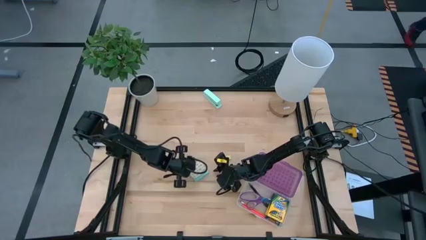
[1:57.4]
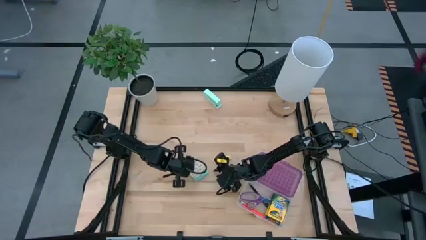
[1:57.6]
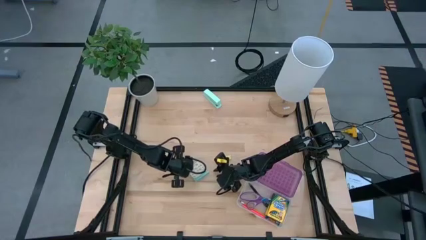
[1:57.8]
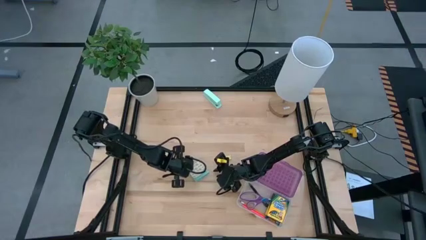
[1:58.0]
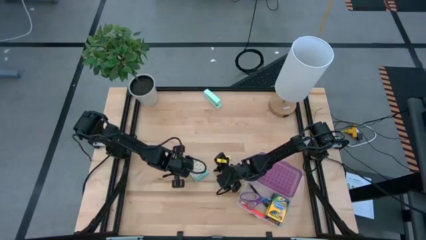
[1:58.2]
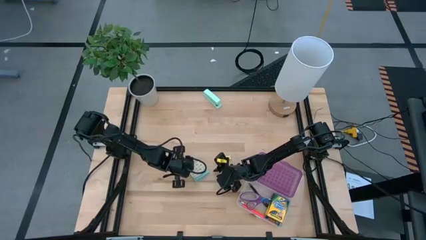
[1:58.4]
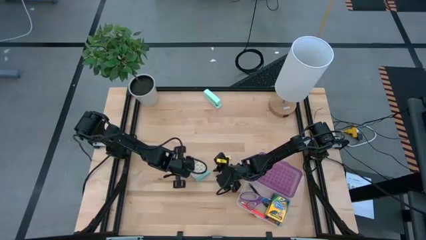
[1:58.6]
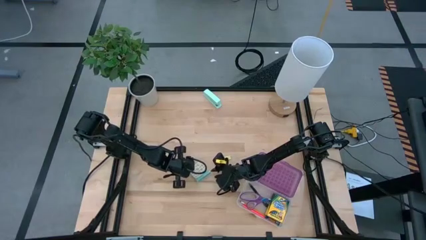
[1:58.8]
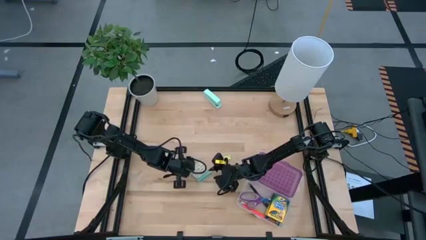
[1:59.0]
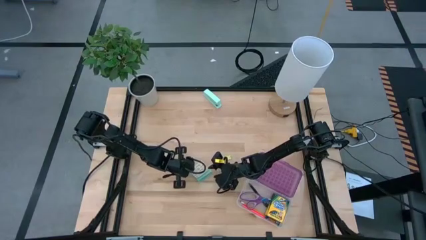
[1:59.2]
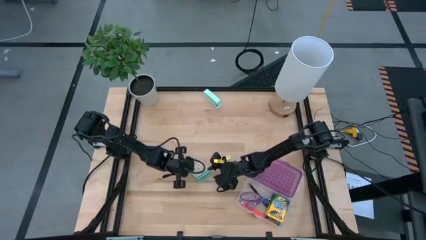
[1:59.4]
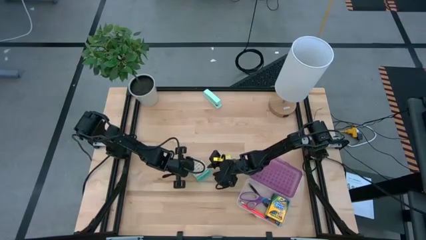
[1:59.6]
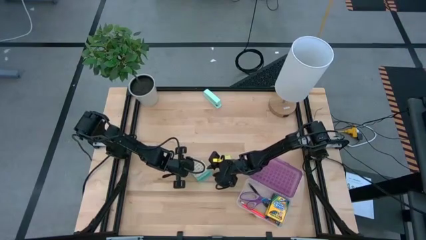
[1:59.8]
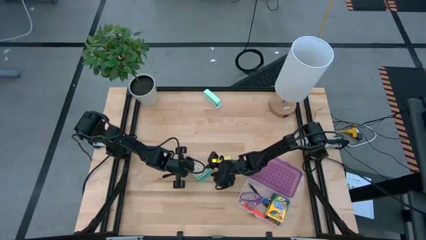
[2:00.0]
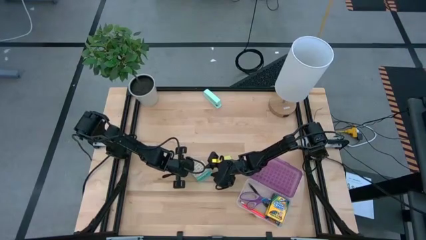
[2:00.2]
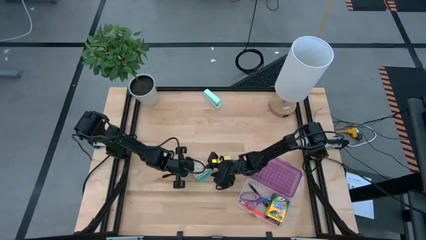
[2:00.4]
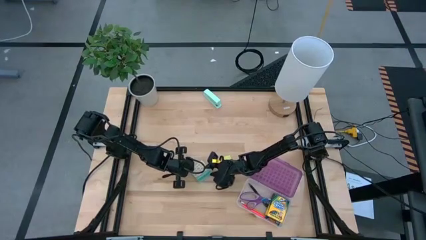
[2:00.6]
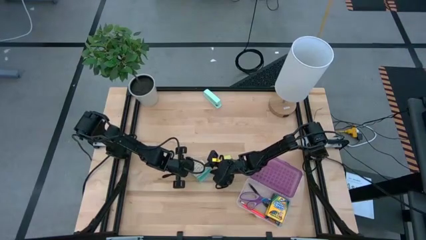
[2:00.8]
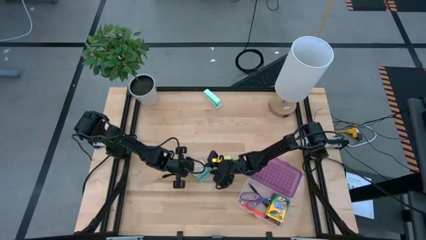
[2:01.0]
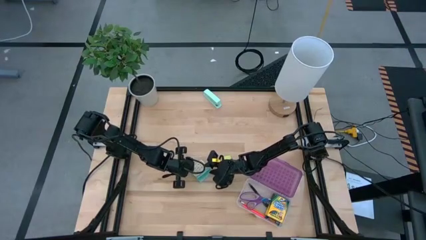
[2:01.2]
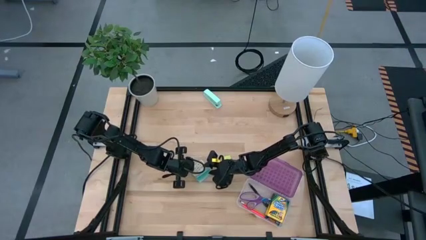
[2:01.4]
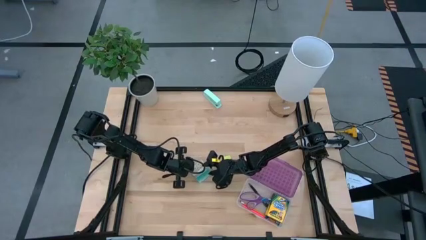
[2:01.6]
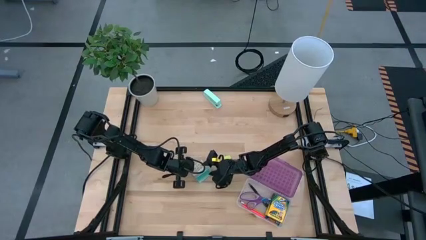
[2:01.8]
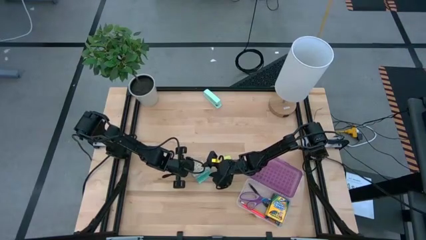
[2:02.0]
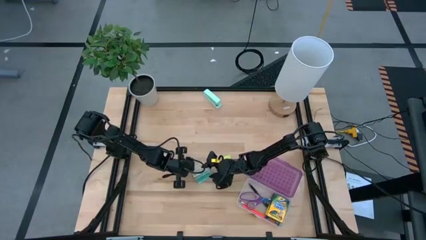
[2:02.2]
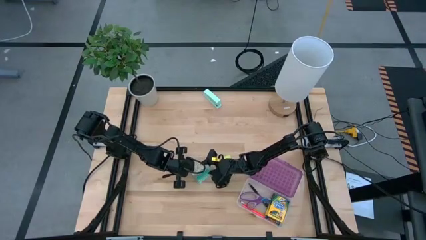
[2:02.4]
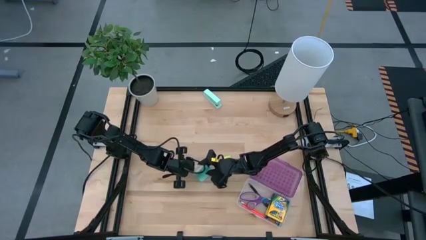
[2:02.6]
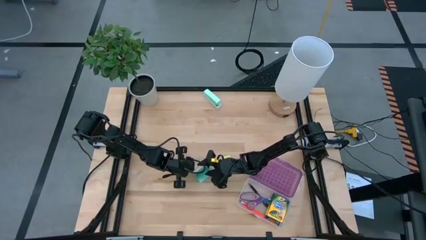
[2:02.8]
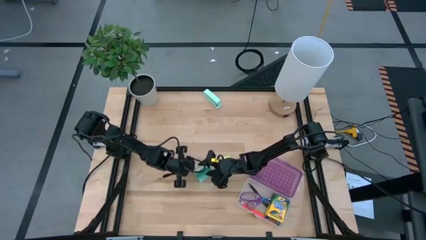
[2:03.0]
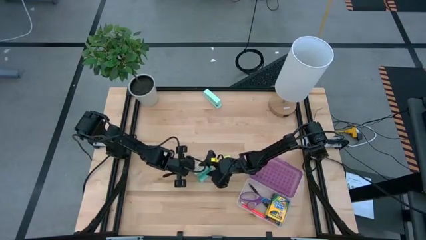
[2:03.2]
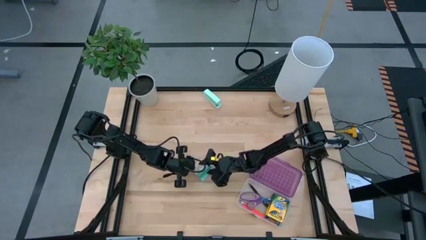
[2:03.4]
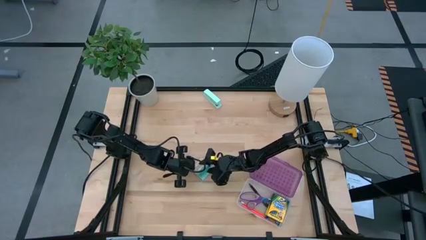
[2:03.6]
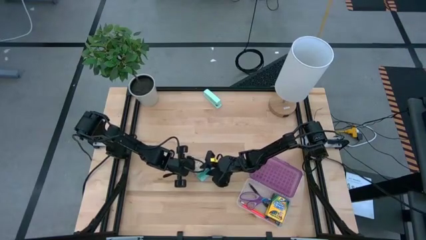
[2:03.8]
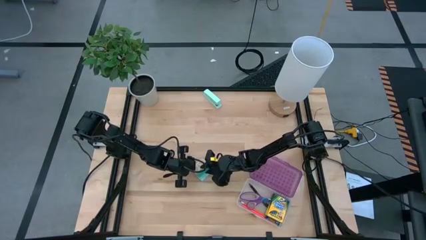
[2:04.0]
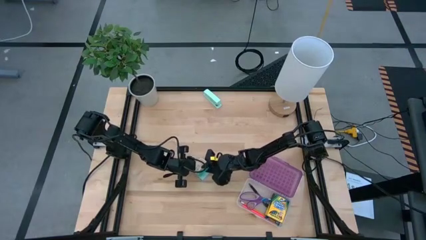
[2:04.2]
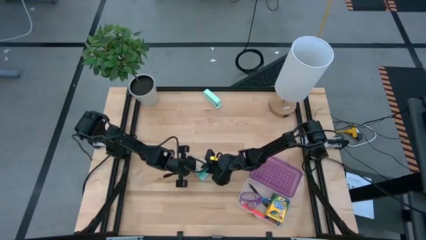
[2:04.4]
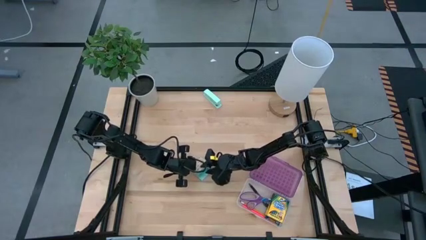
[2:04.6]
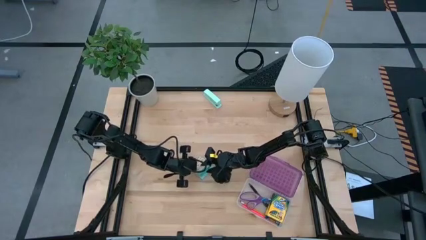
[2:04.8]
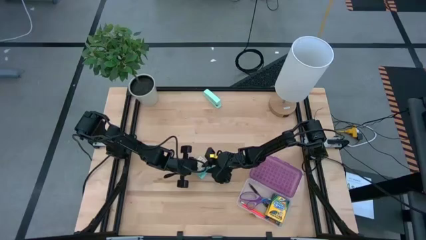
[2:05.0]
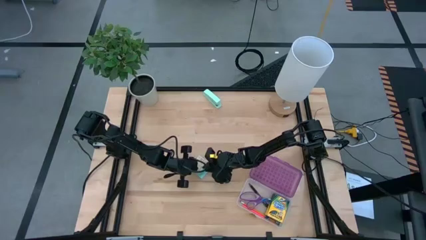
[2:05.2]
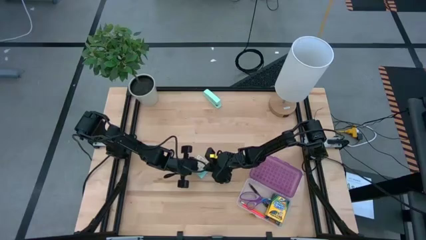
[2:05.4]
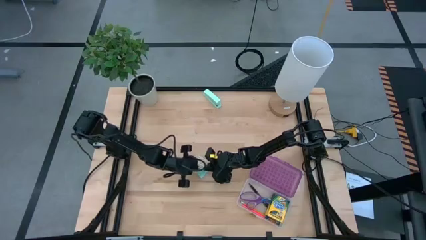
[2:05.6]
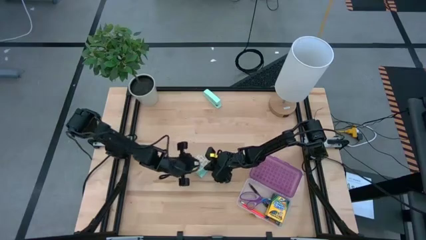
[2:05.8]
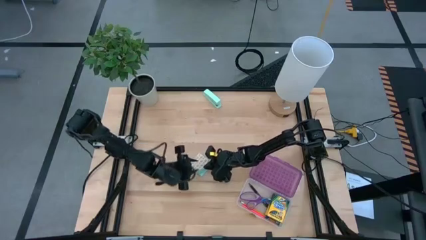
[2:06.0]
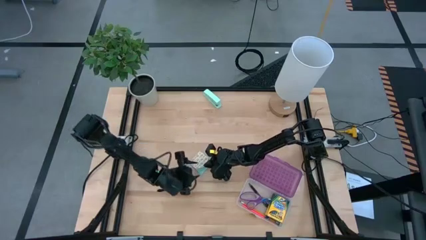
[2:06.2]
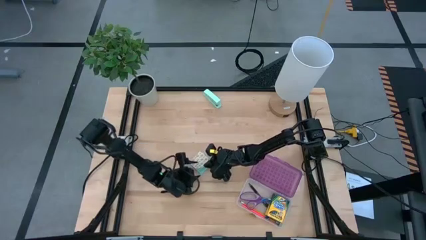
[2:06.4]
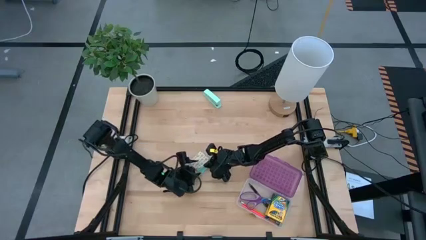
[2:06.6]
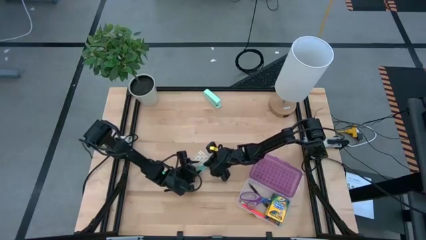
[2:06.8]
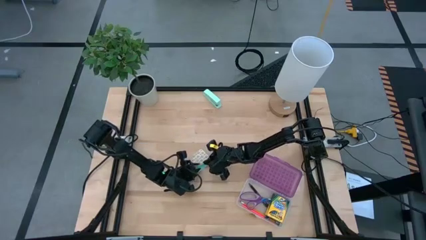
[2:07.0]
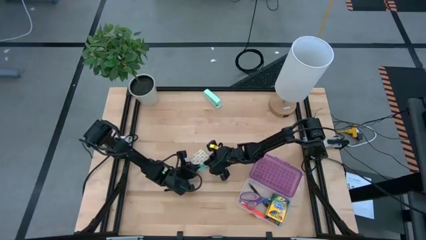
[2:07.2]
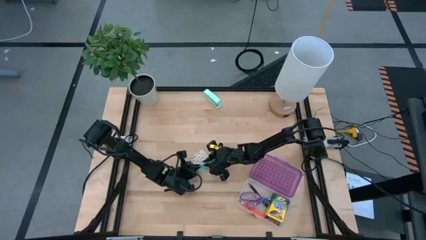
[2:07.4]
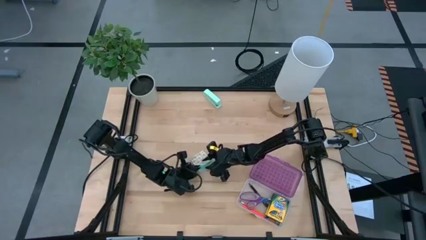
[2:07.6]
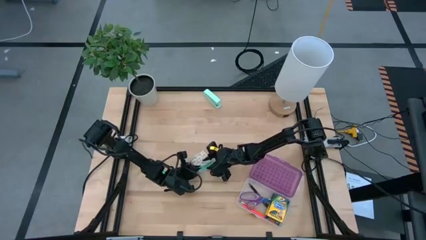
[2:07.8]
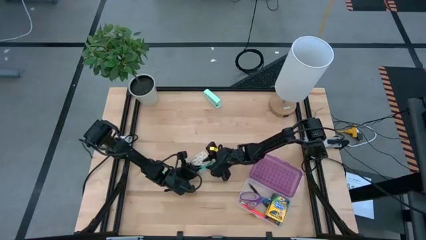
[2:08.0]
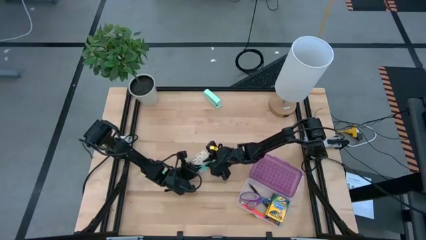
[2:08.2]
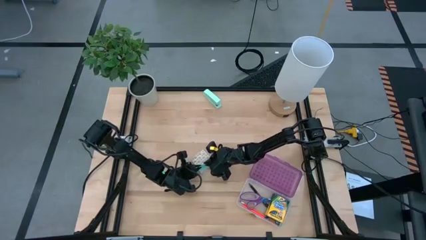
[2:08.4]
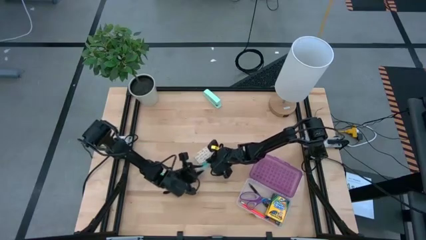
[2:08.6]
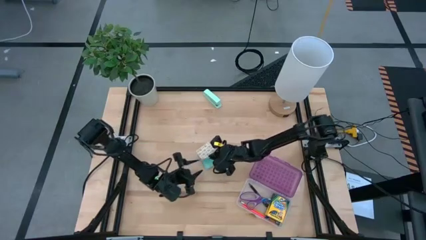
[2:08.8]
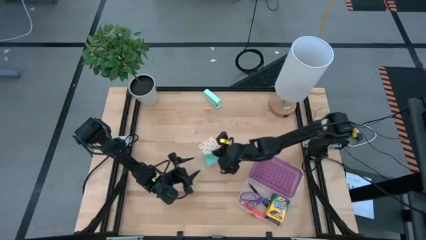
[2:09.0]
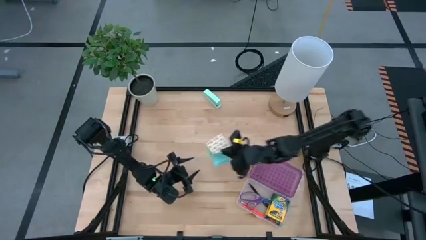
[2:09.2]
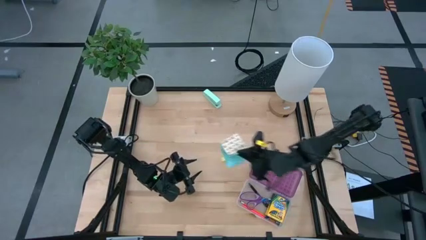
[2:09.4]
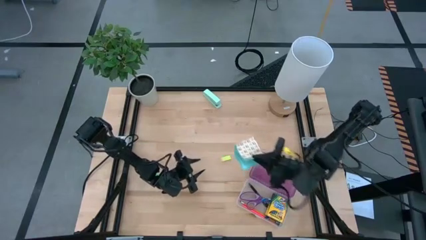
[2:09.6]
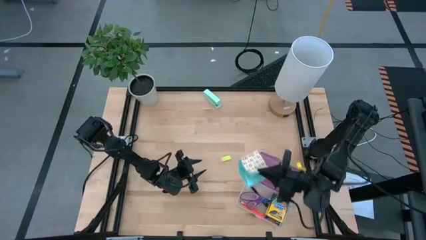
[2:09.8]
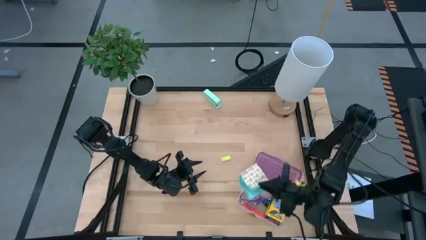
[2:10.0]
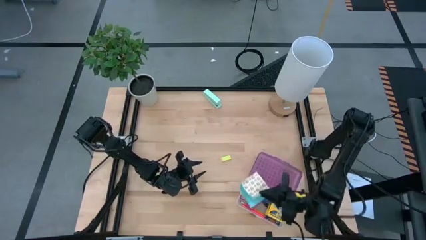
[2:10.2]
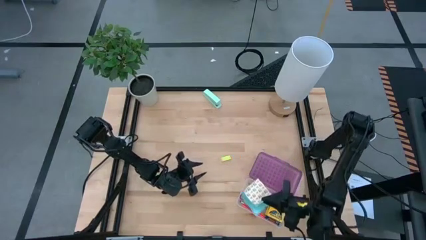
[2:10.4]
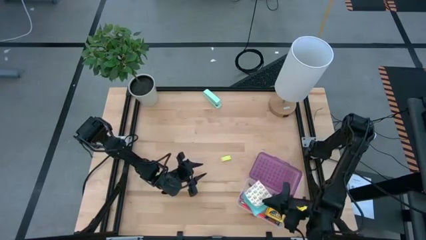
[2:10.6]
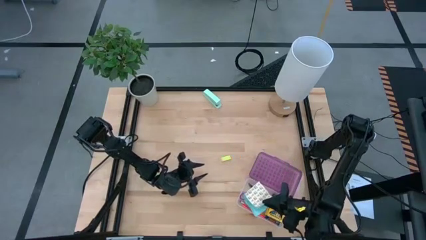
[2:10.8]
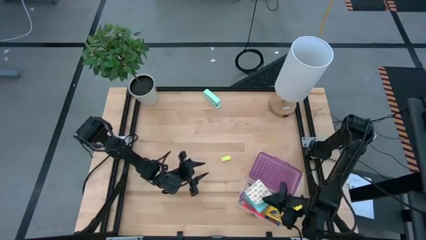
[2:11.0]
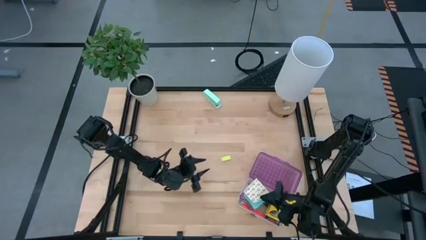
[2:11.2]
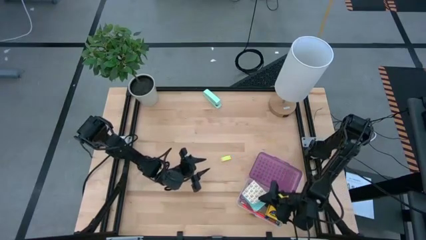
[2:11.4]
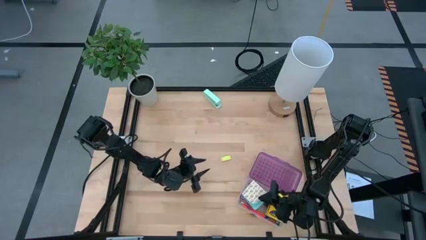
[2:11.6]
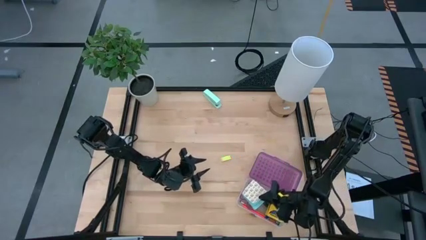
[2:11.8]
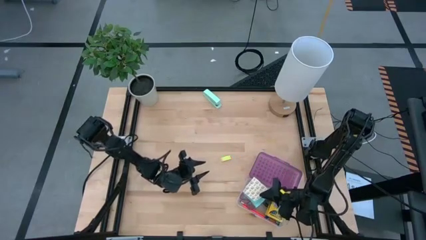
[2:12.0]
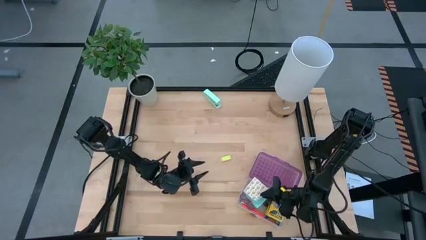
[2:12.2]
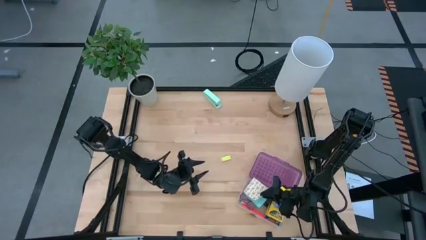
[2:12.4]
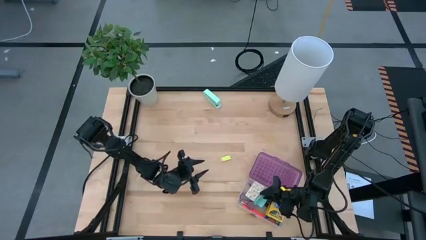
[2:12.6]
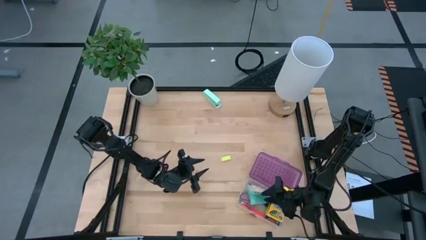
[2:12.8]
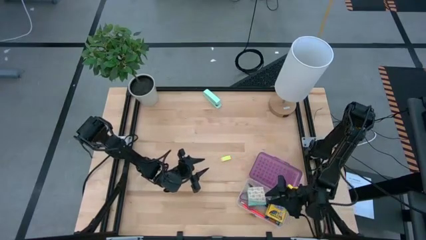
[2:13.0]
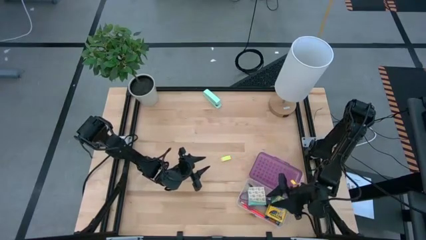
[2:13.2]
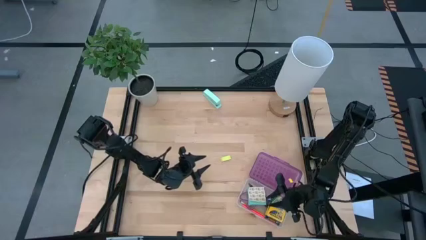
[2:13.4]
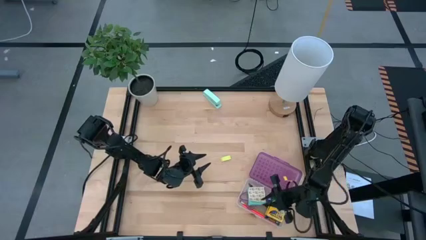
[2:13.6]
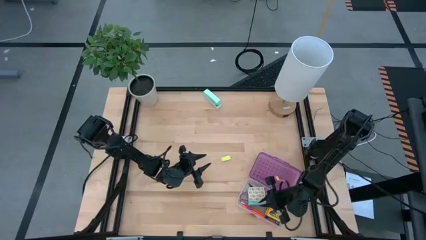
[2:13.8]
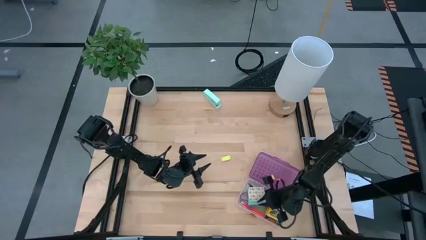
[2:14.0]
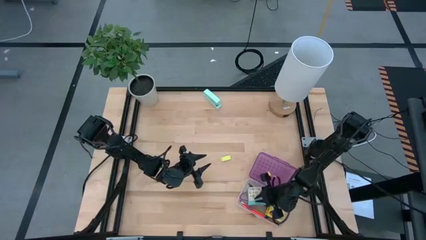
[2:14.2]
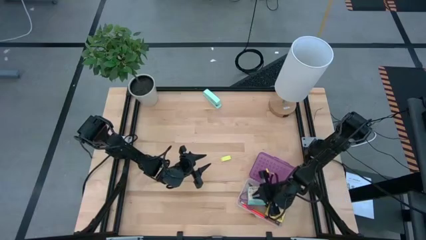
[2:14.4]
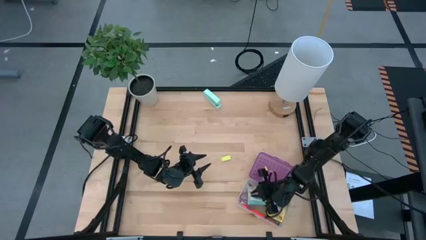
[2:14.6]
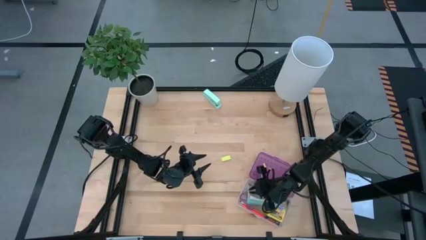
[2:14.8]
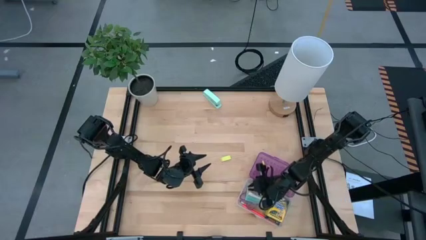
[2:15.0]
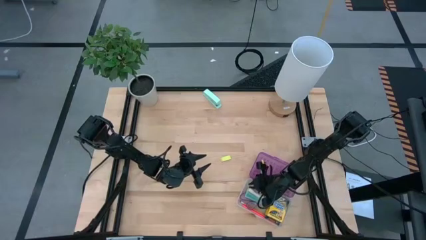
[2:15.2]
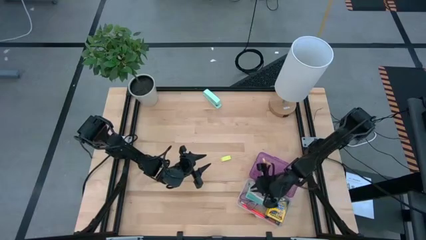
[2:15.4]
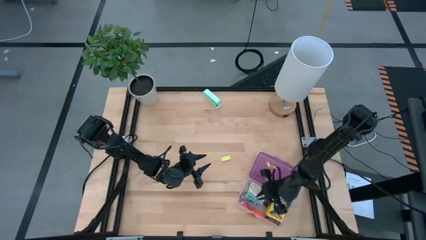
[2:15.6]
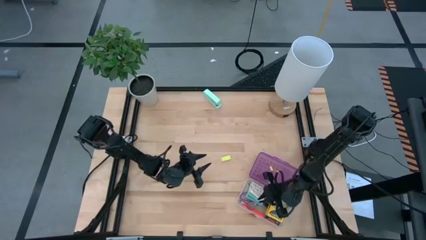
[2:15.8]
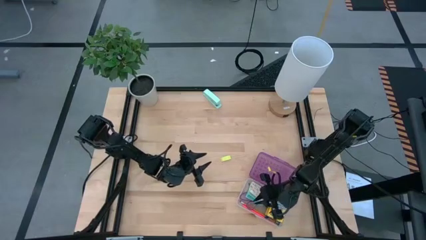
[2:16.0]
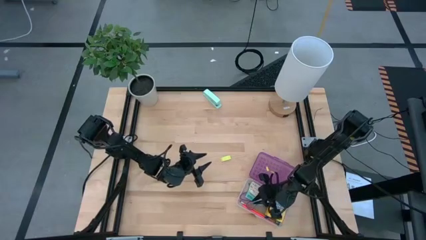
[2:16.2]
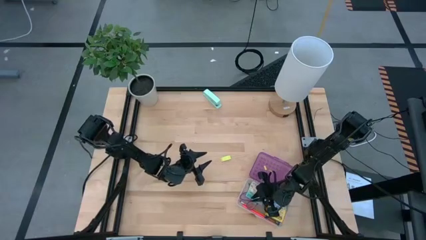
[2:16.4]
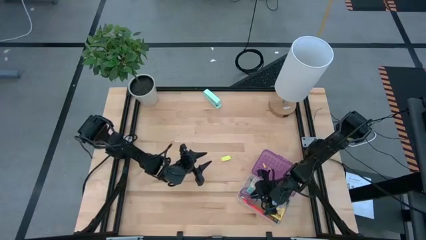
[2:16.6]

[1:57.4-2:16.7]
Task: Pack school essentials
Put the blue sticky notes into the violet supply box
